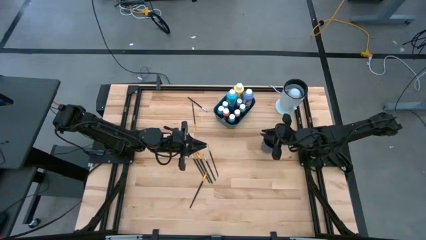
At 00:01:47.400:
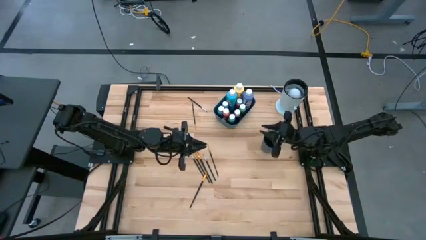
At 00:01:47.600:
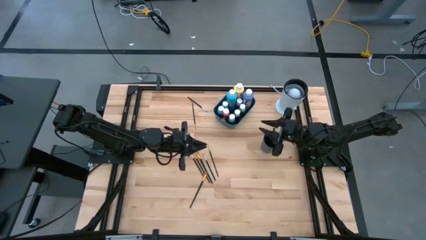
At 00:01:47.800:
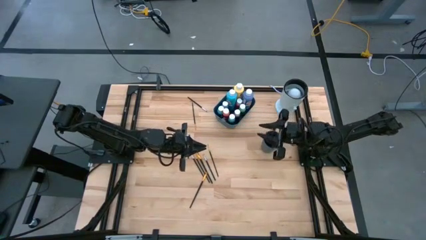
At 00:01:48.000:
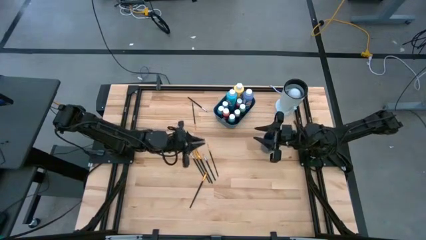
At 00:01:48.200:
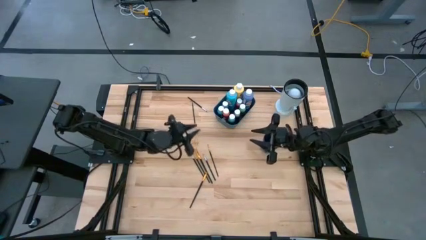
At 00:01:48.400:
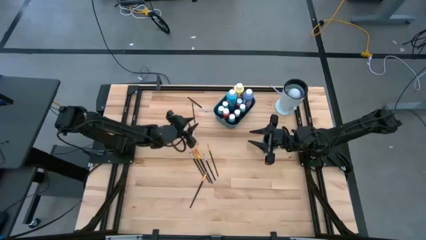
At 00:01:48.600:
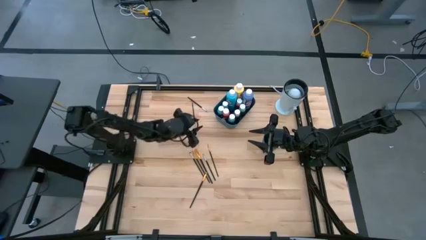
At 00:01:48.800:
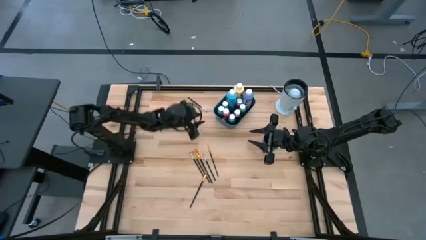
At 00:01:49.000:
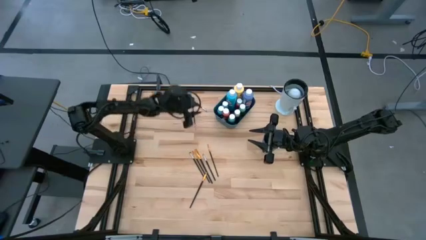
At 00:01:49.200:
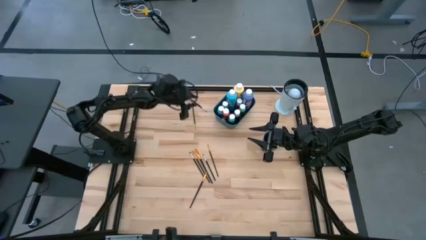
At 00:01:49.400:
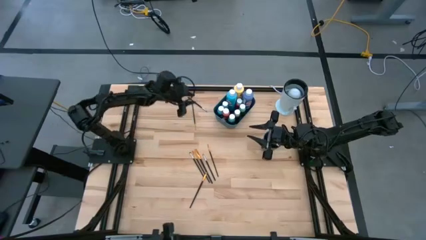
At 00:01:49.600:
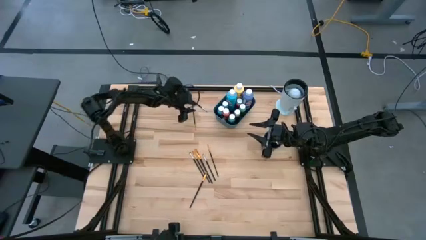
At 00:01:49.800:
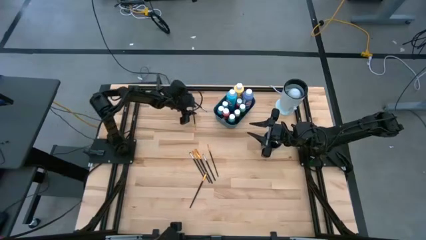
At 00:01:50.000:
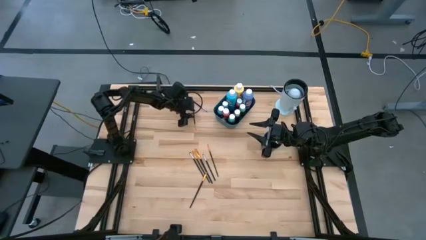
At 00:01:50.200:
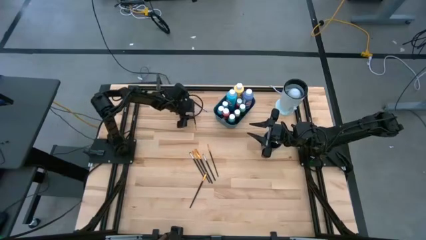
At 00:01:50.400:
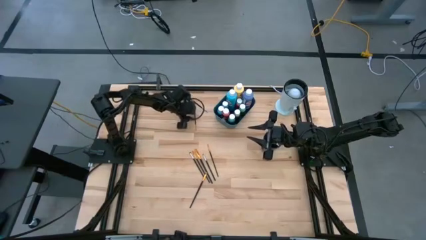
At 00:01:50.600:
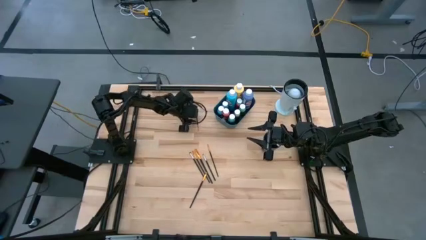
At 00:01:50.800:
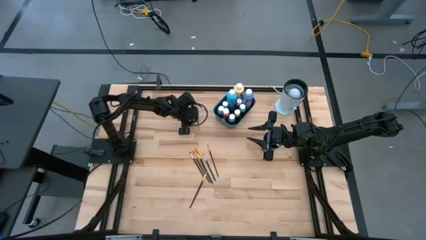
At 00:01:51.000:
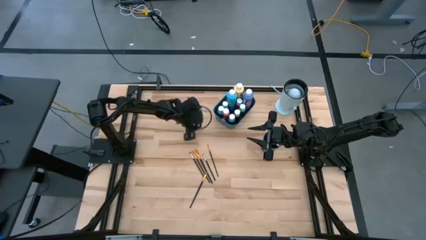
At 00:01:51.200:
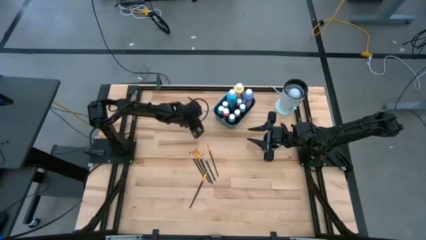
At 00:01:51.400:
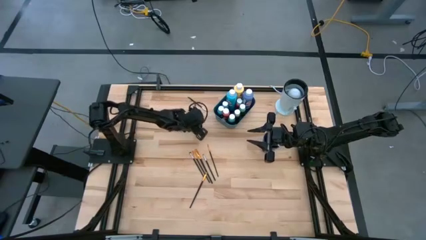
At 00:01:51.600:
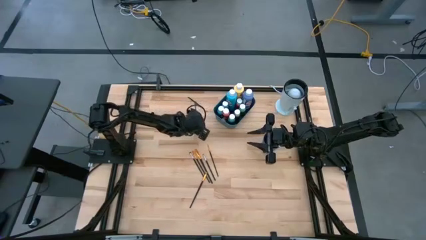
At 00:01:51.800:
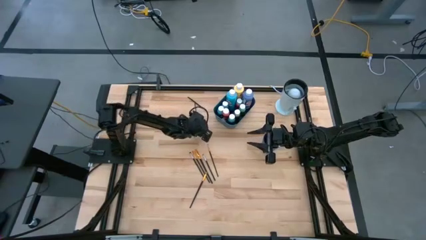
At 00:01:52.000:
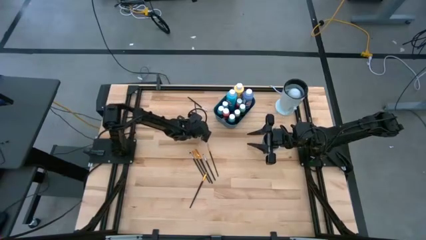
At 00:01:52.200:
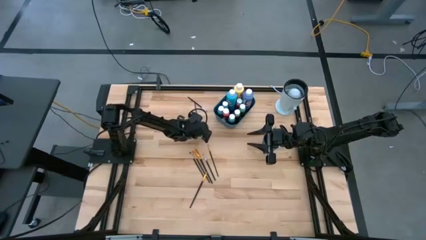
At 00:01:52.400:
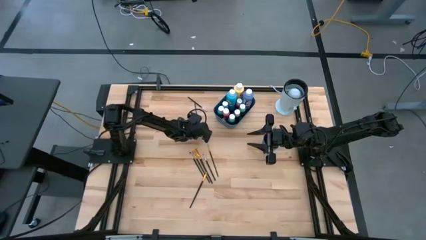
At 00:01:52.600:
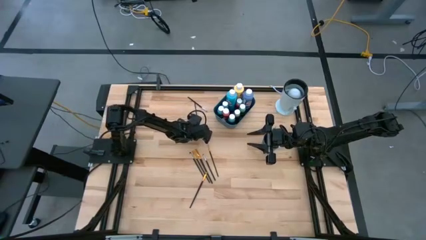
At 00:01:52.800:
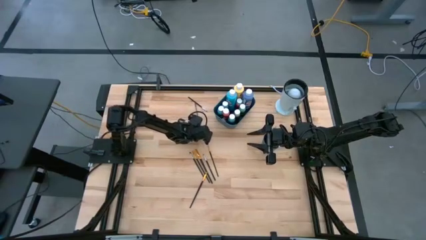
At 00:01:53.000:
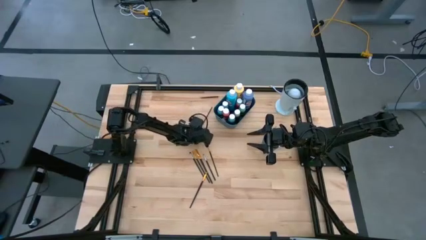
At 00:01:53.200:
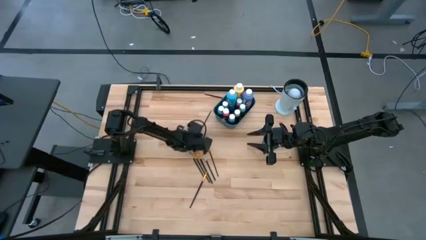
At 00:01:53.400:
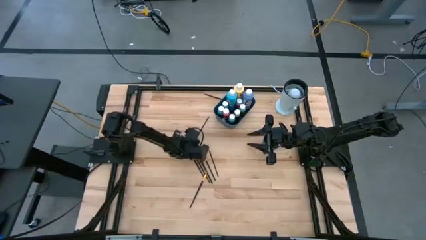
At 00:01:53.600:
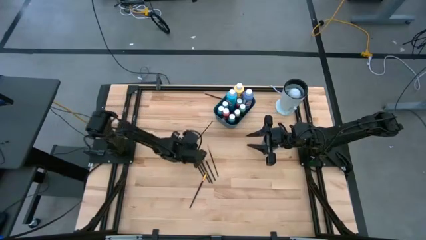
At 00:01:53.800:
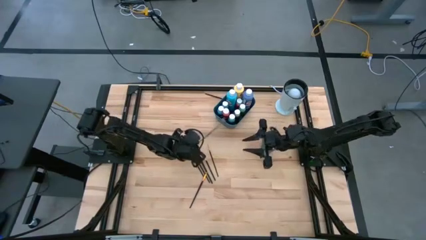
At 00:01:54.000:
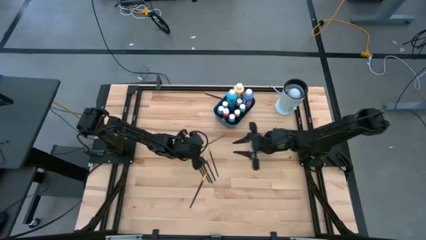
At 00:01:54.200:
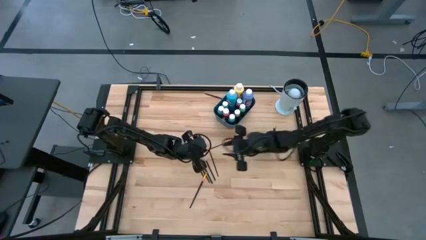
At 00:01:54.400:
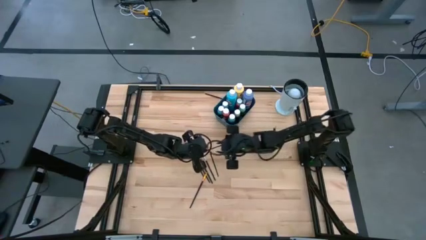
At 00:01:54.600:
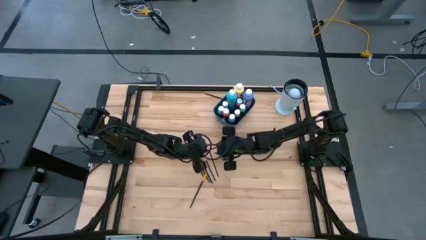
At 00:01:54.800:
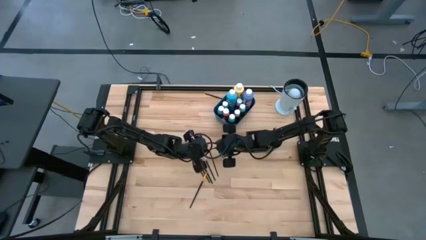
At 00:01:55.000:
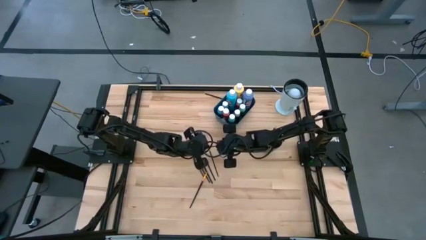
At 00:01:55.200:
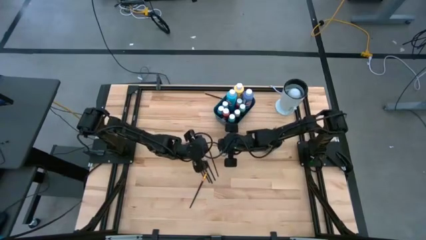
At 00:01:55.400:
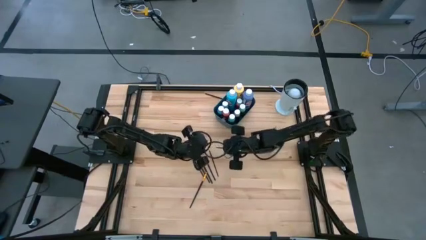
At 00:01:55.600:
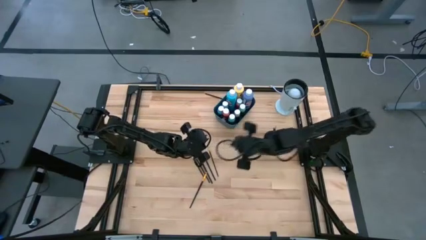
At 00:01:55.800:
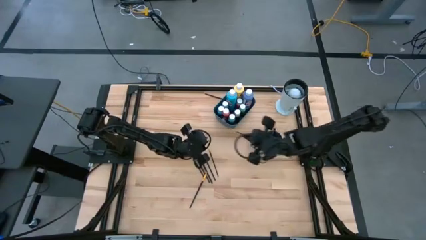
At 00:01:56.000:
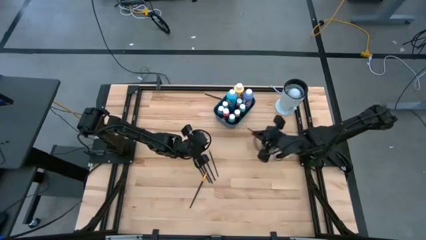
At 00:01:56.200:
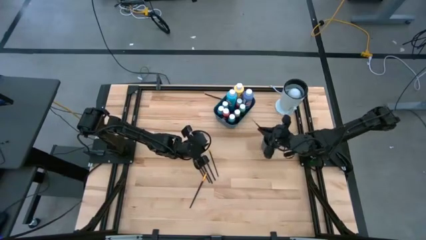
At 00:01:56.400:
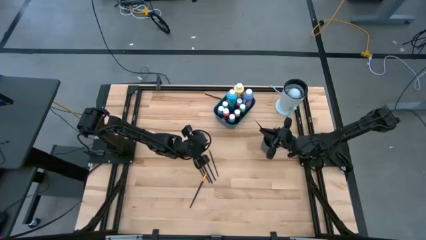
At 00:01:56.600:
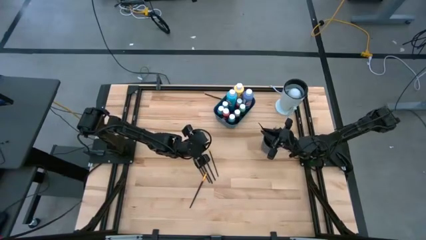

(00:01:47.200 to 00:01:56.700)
Task: Pick & Place Paint Supplies
Put the golden paint brush into the blue cup

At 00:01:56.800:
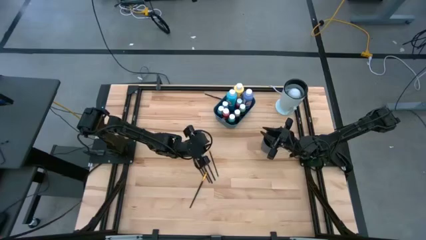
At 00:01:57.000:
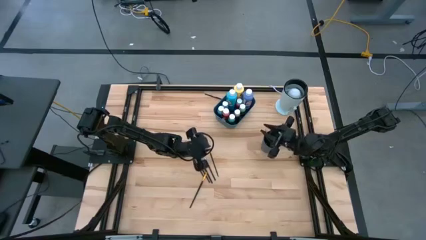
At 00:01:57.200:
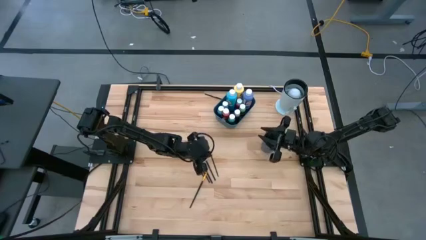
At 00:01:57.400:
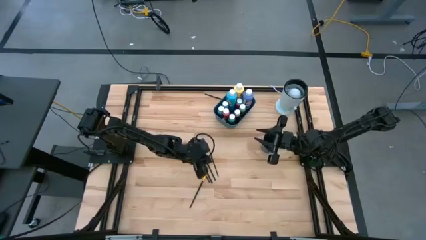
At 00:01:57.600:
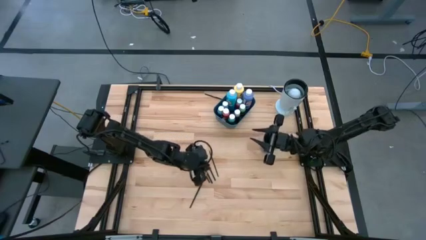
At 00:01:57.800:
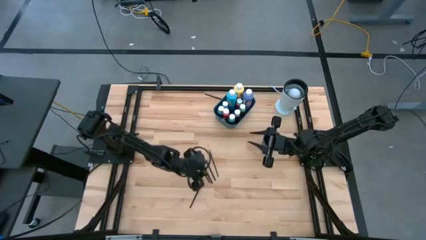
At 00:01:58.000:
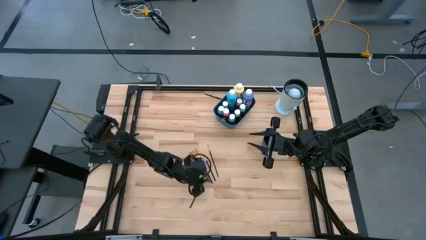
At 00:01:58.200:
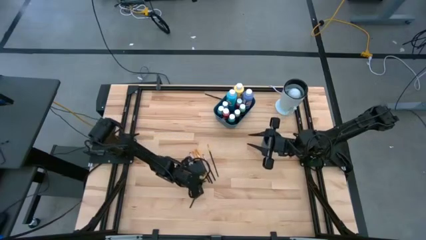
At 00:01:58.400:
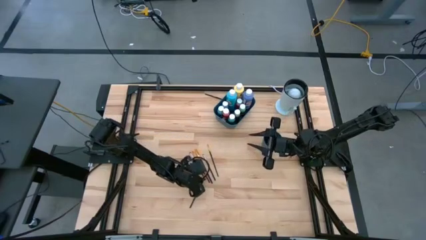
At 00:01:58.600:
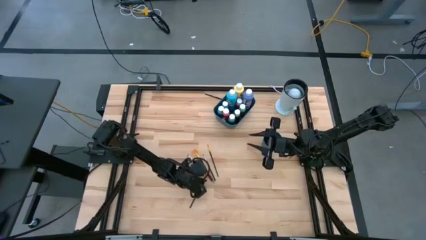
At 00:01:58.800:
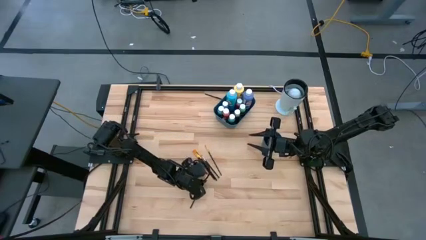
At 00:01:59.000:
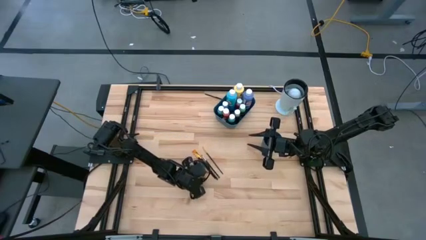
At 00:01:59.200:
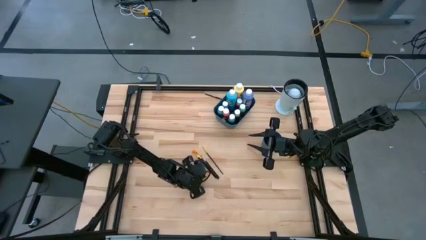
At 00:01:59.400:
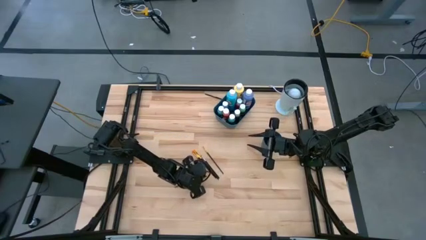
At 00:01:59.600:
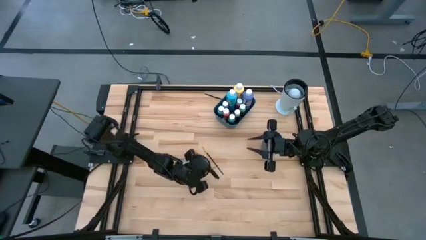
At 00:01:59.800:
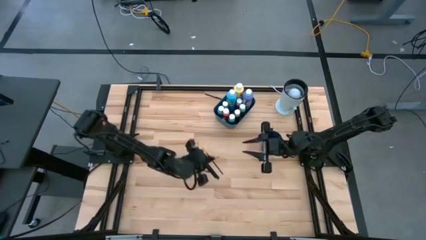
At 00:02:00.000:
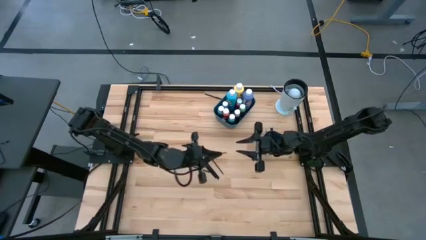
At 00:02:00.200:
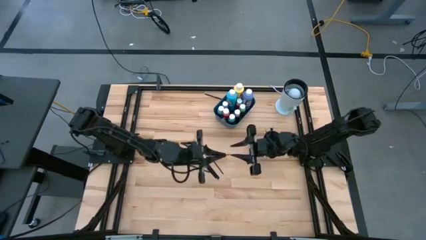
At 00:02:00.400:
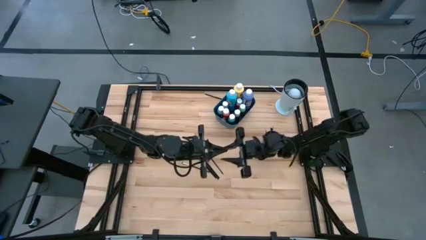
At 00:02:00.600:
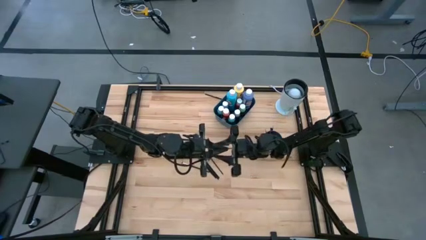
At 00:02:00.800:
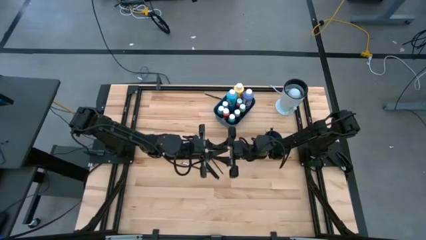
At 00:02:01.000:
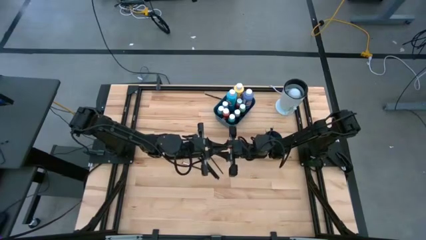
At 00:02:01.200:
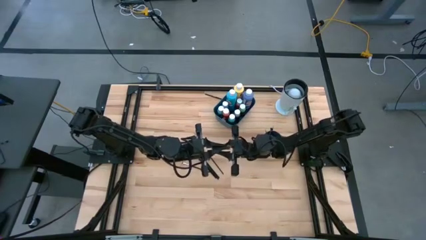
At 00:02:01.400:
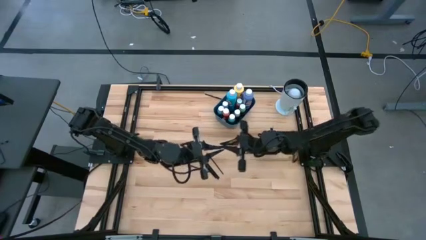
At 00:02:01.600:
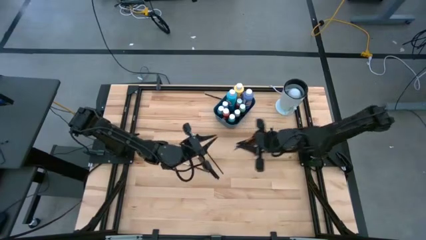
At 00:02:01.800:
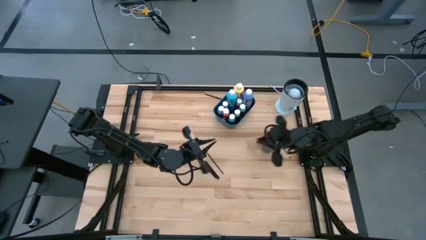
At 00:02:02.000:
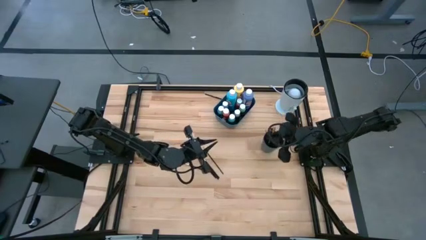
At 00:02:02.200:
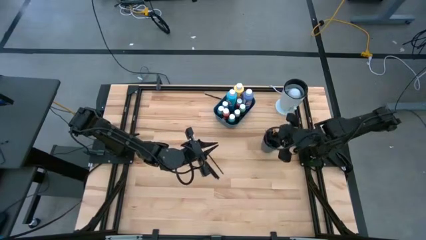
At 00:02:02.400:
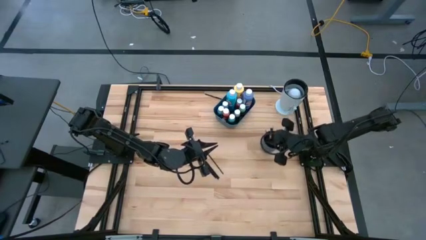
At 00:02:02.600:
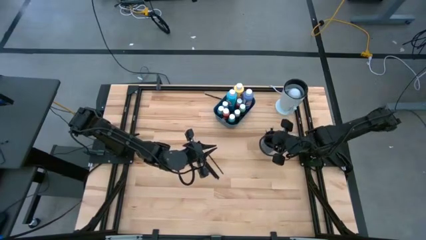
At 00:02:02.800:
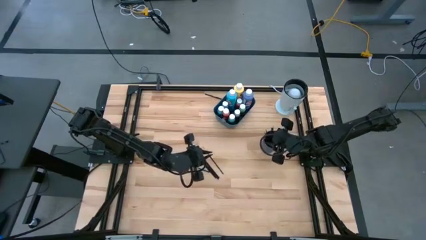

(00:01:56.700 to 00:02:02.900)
Put the golden paint brush into the blue cup
